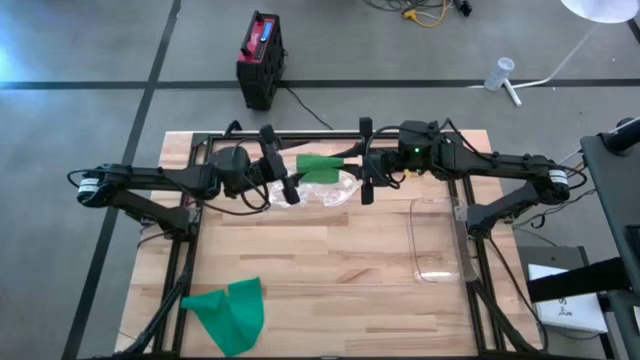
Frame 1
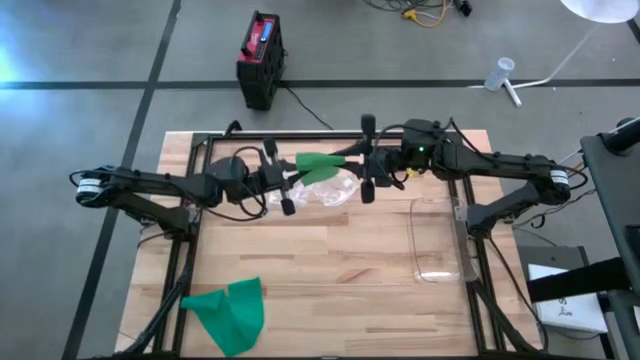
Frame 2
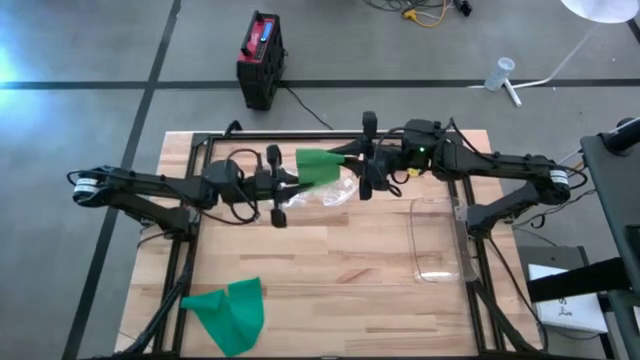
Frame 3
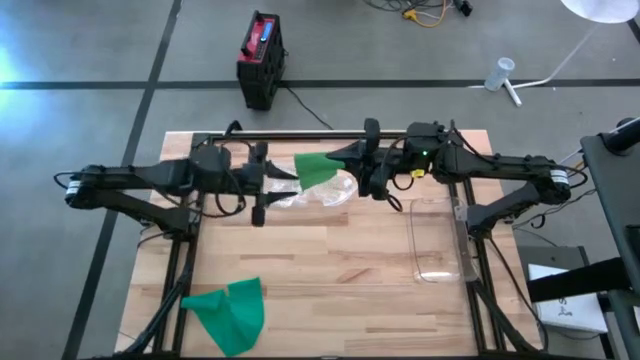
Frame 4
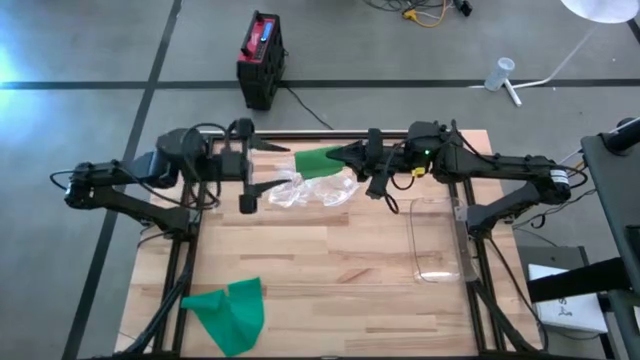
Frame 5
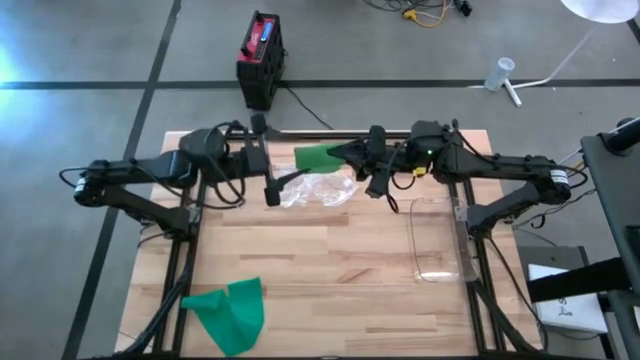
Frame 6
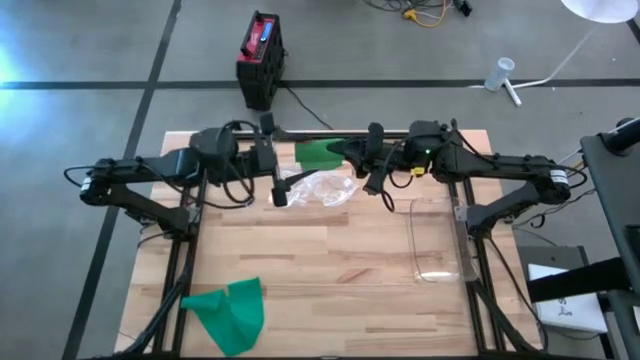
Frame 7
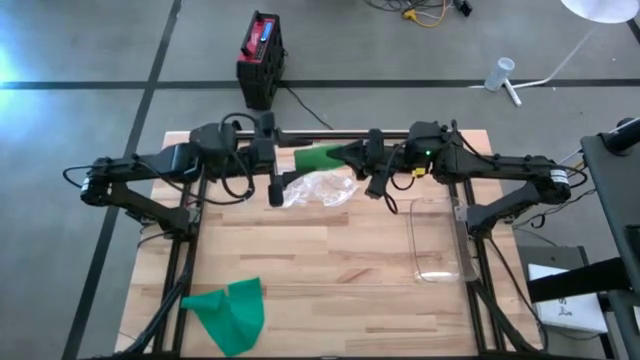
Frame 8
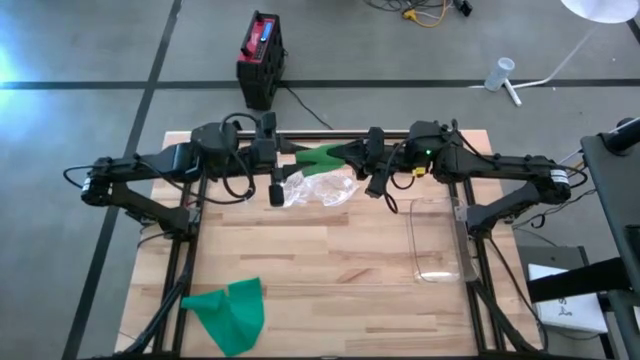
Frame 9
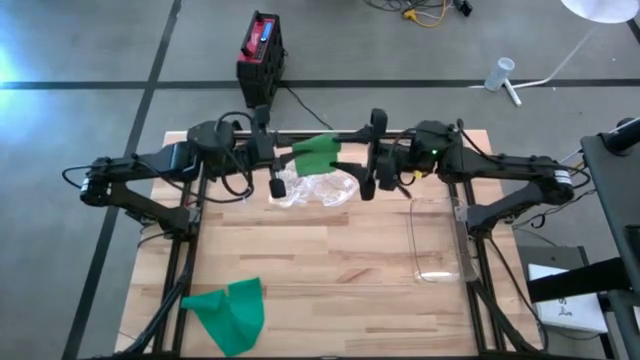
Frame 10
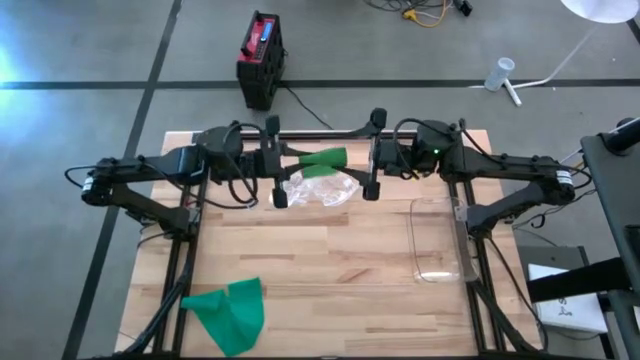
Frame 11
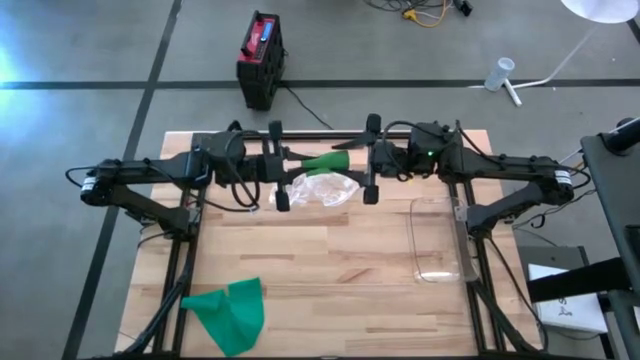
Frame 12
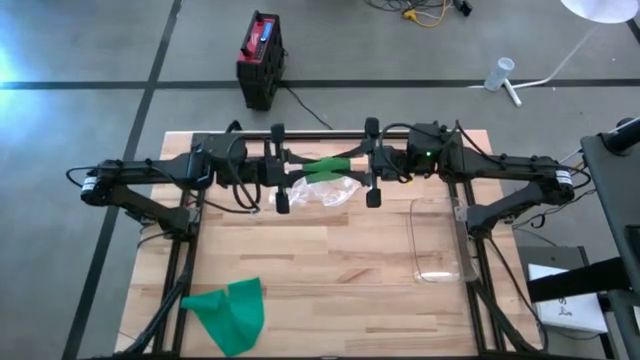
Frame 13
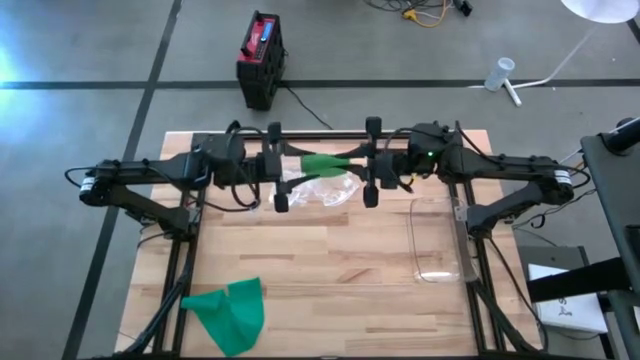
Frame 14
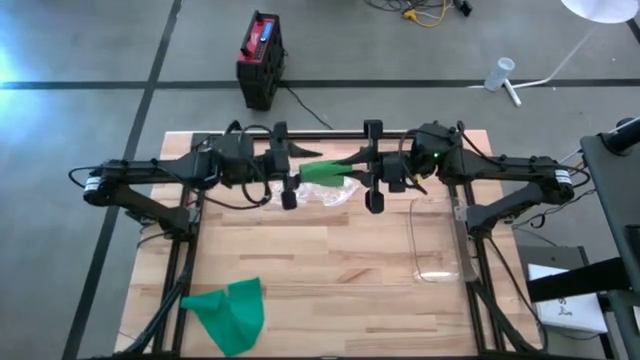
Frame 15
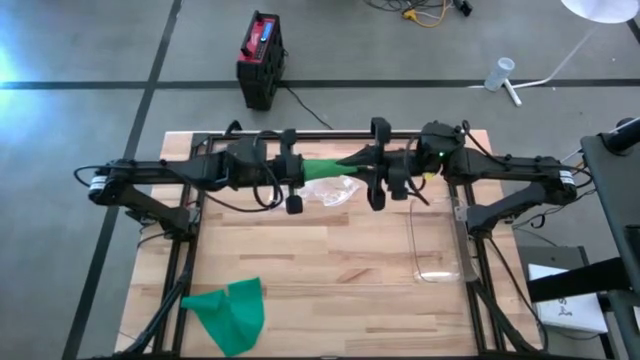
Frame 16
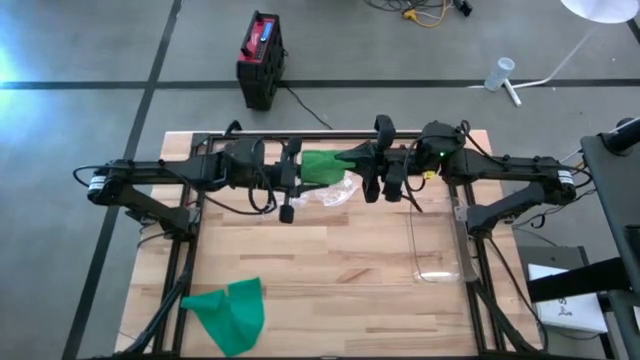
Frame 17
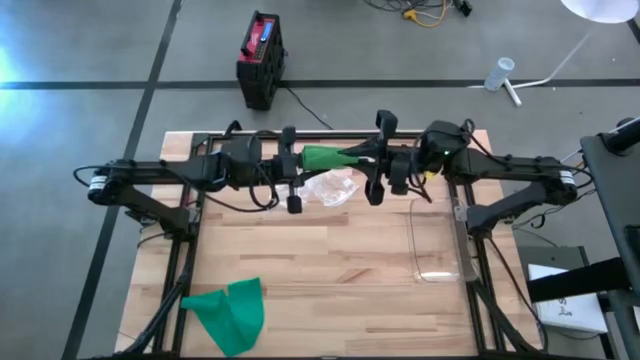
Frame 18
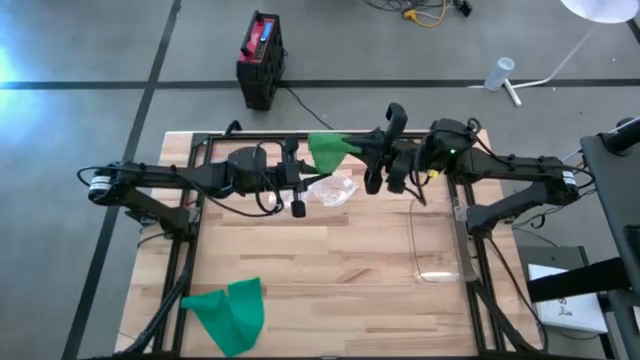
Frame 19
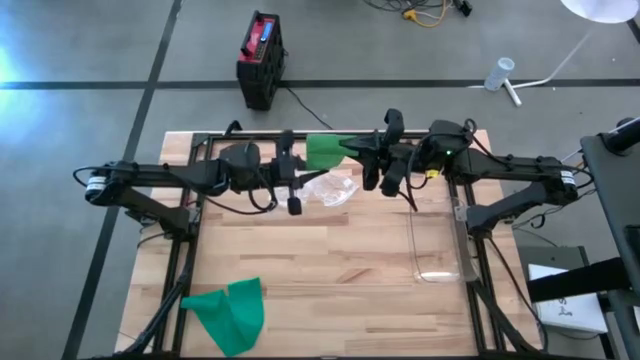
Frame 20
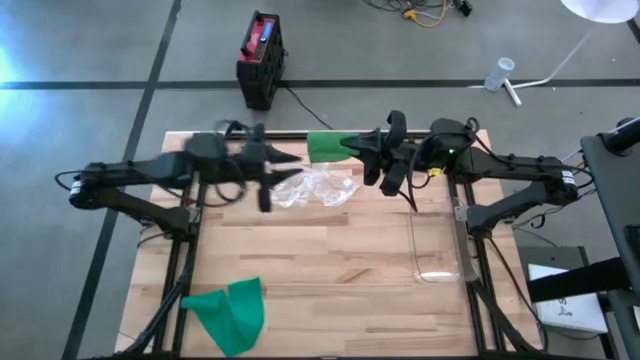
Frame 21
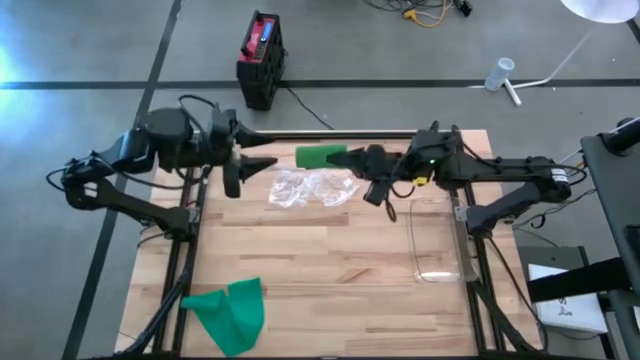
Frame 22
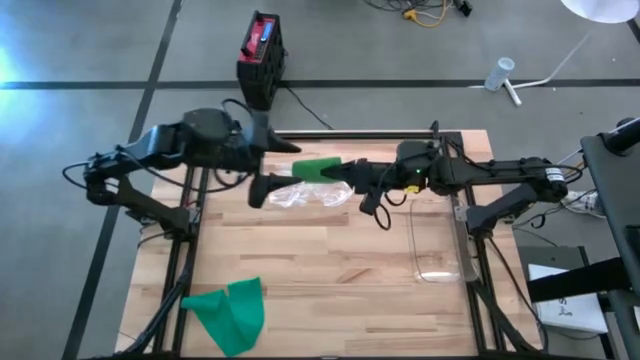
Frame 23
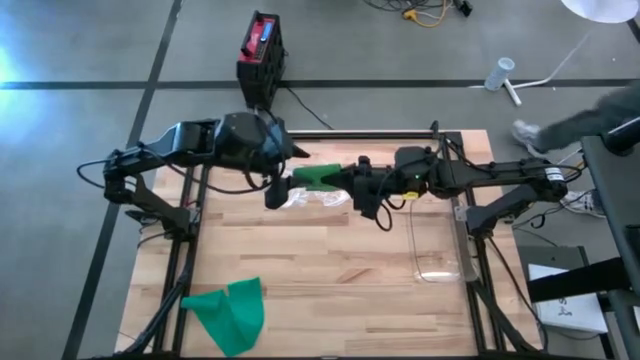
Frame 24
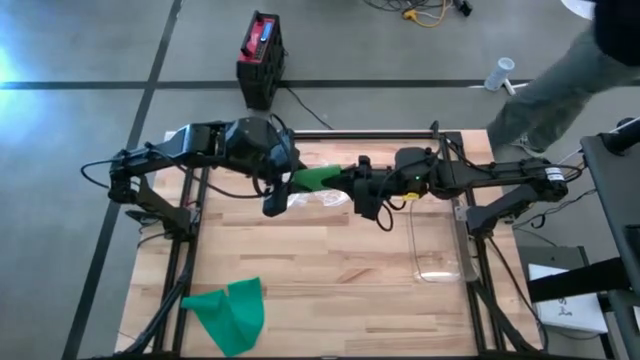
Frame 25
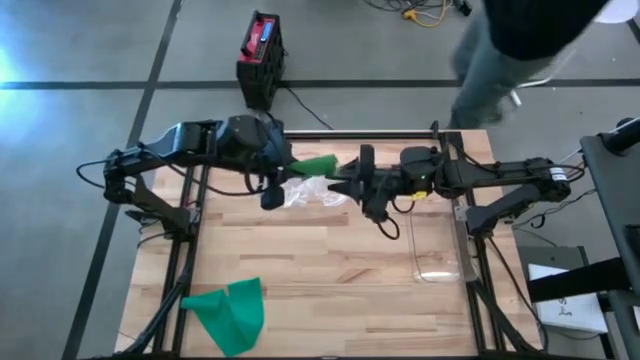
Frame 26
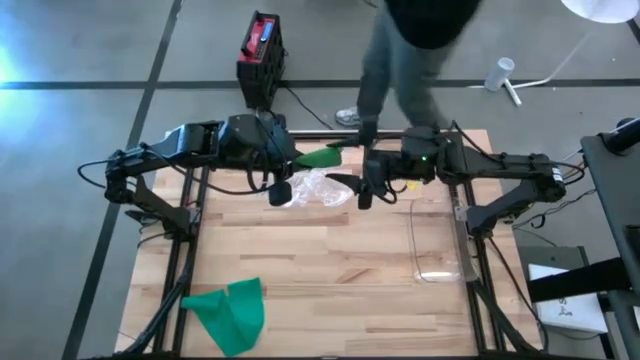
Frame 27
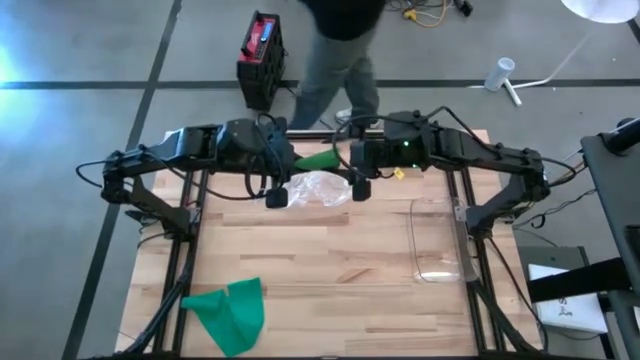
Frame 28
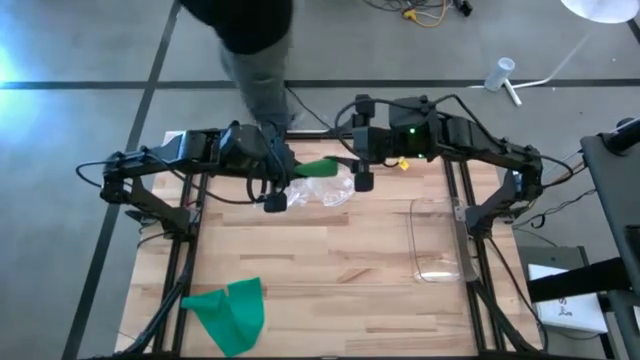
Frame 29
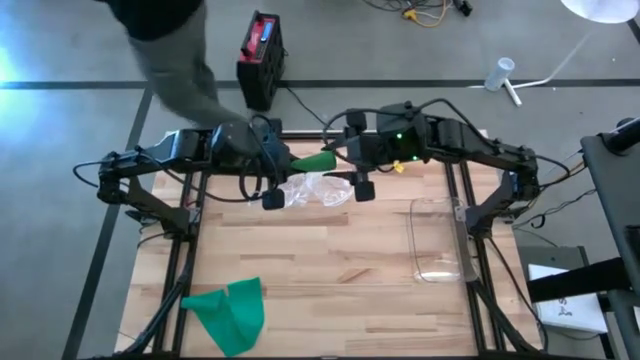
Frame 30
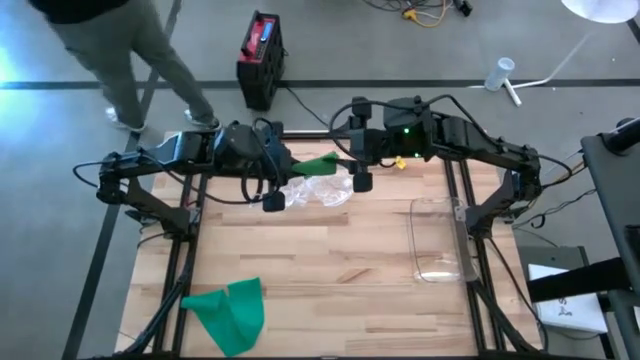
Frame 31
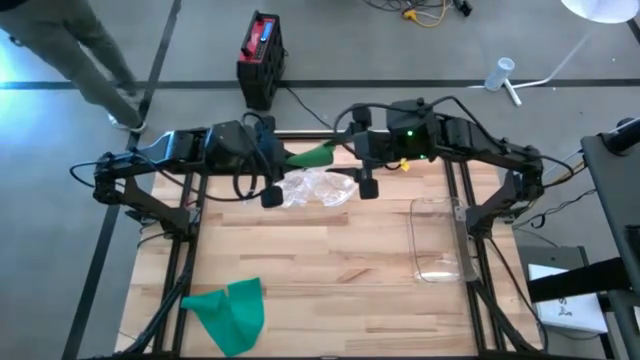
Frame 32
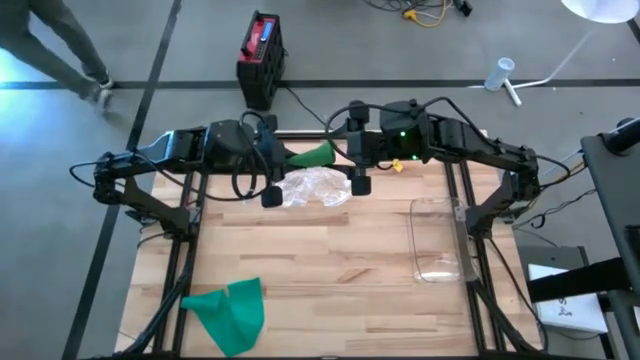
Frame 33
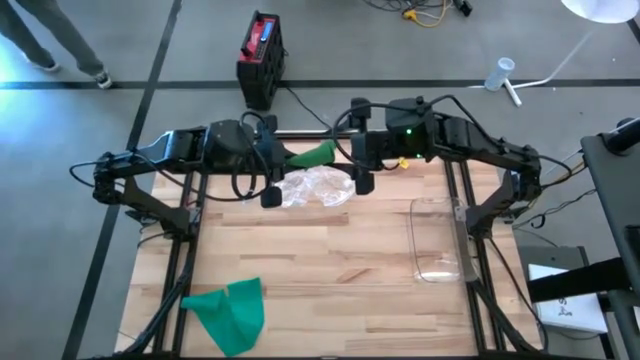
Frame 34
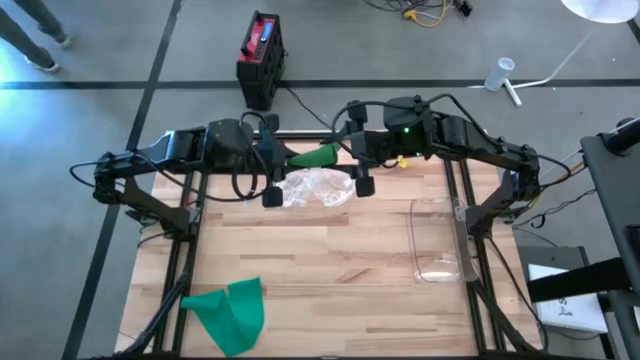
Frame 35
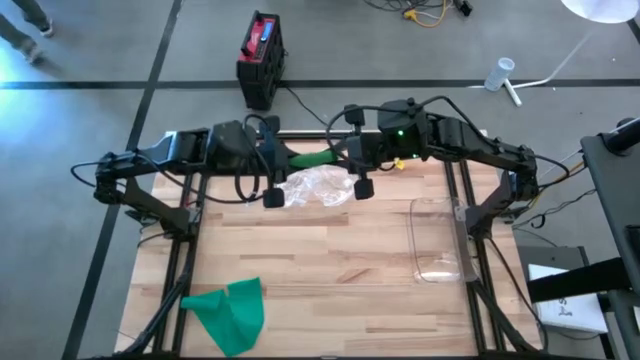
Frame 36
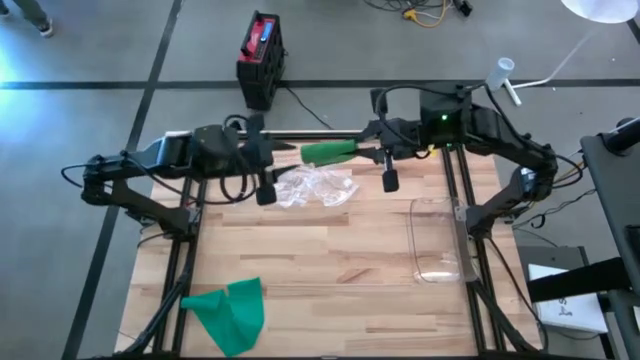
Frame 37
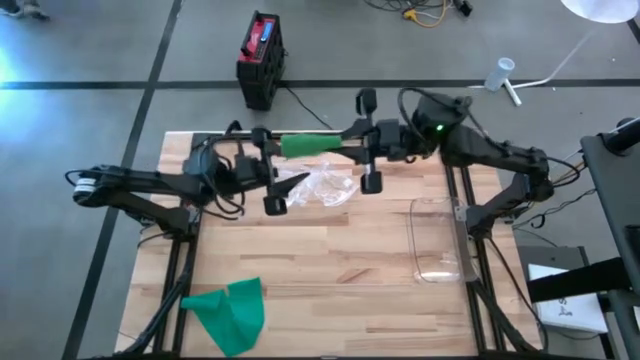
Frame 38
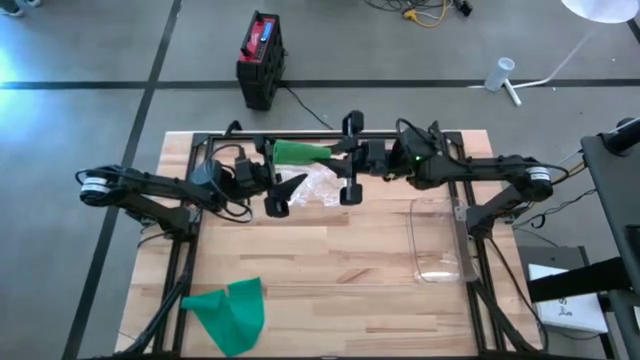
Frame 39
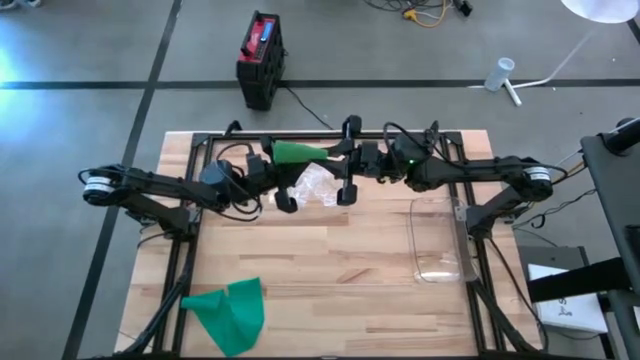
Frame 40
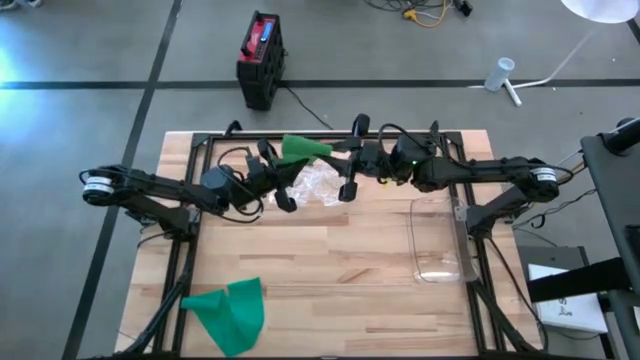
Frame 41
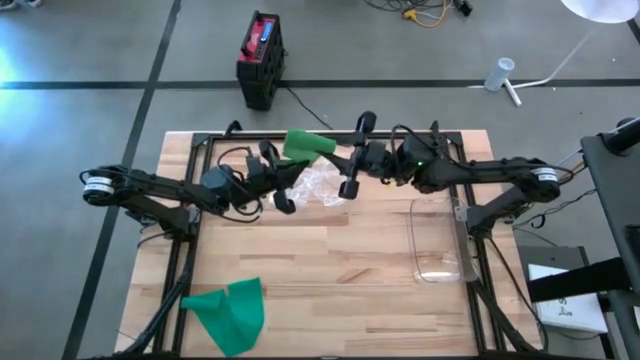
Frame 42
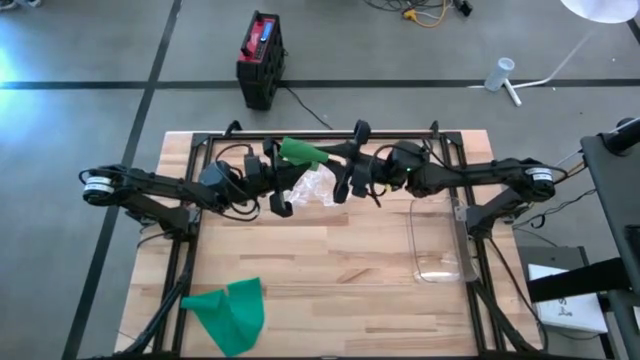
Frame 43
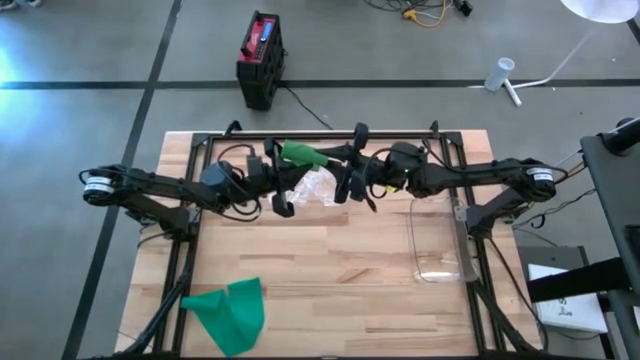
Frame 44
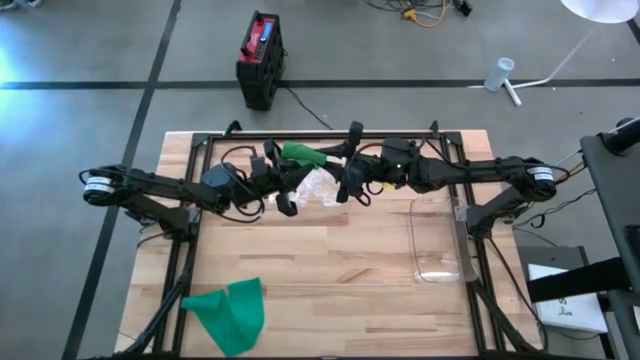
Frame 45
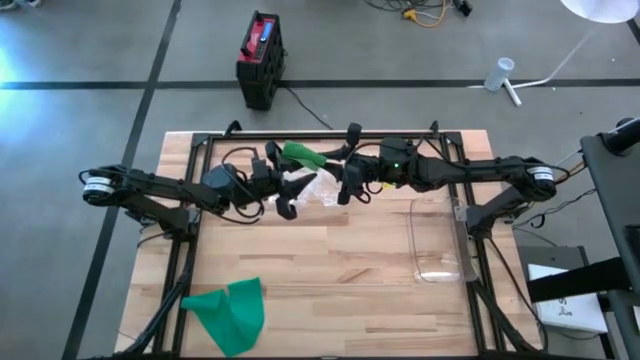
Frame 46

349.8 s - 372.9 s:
Task: Roll bandage
Roll the green bandage
